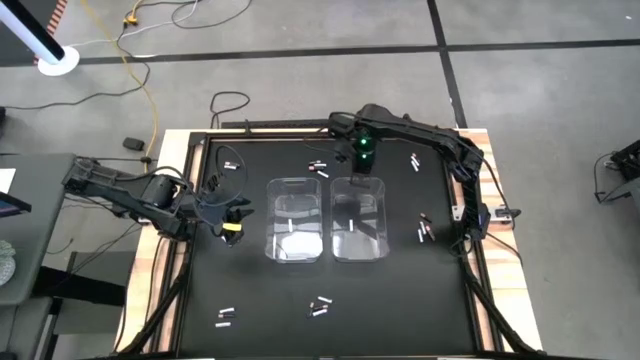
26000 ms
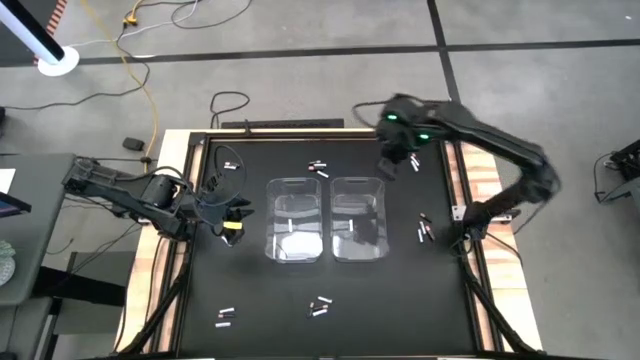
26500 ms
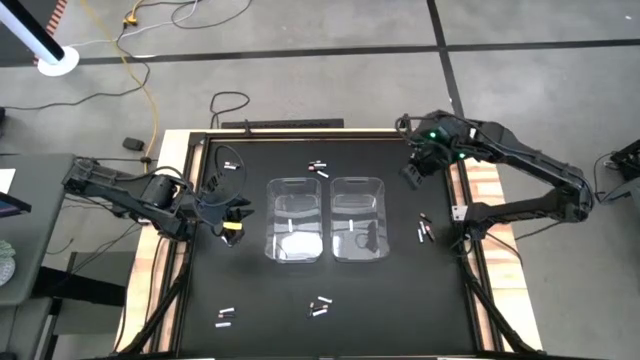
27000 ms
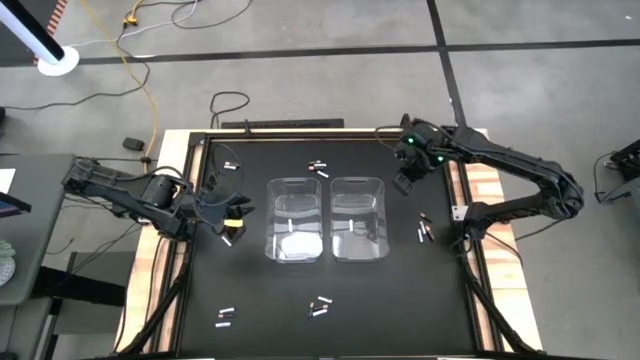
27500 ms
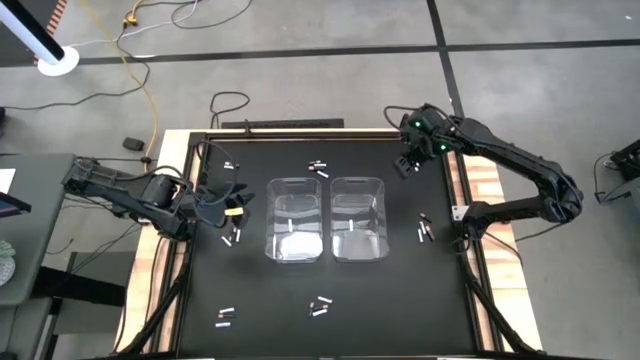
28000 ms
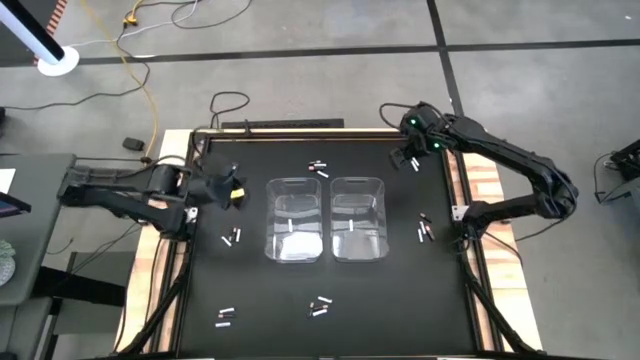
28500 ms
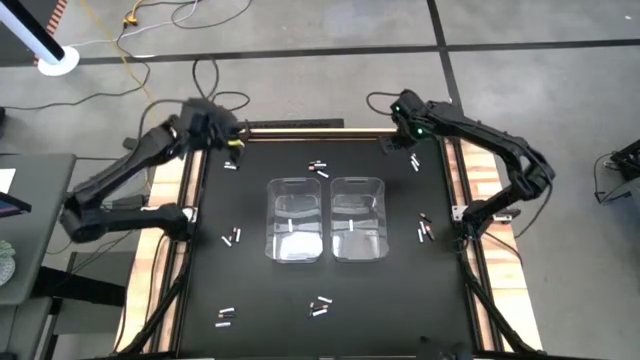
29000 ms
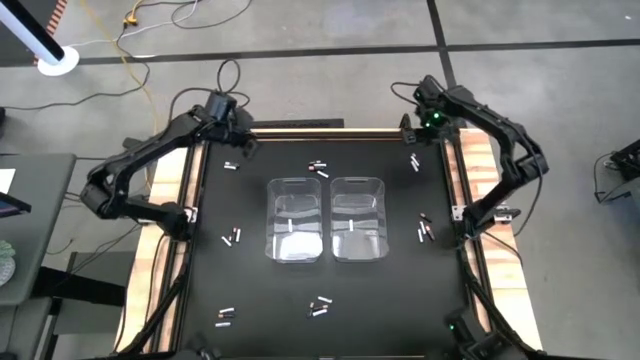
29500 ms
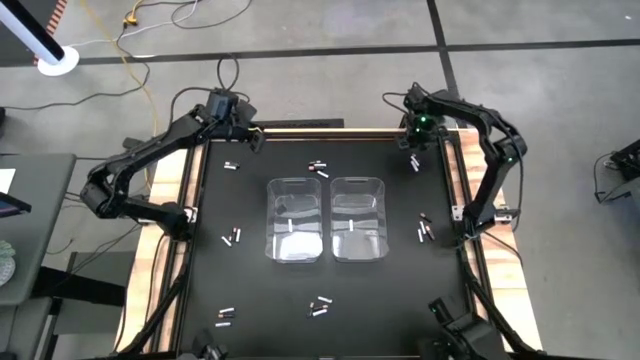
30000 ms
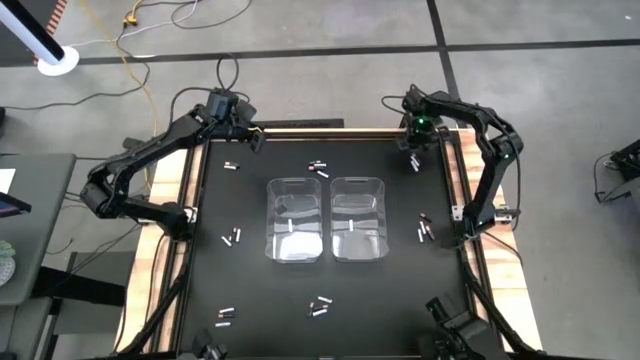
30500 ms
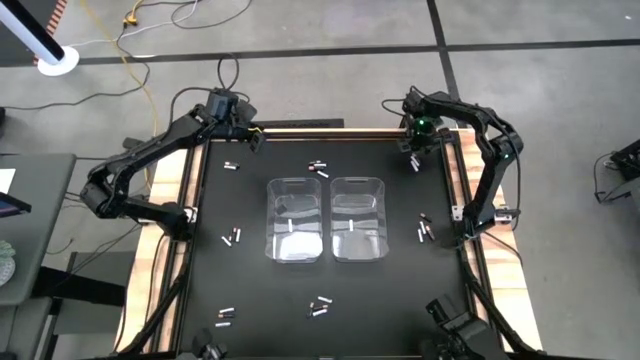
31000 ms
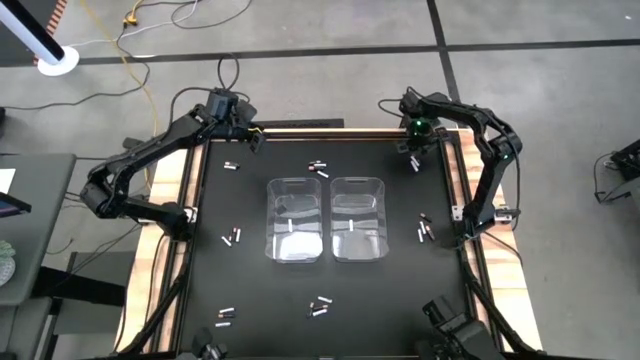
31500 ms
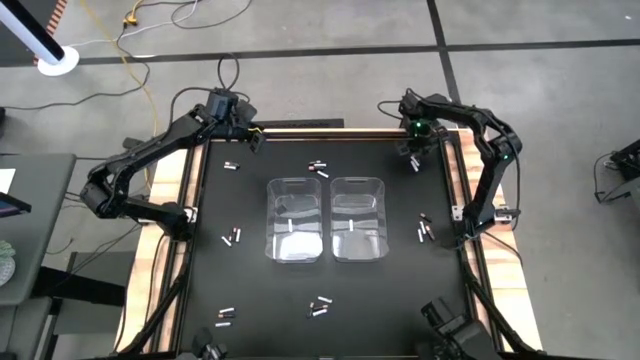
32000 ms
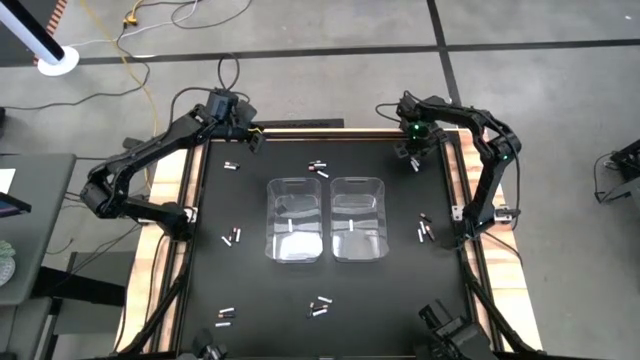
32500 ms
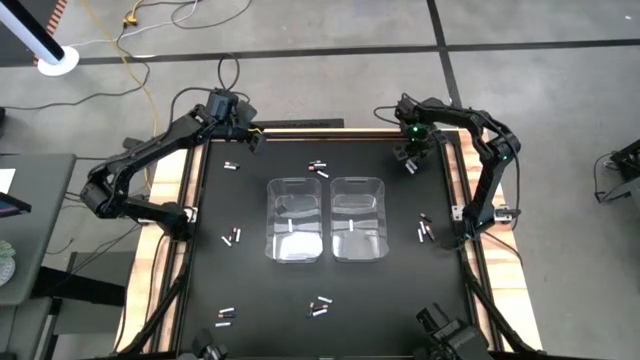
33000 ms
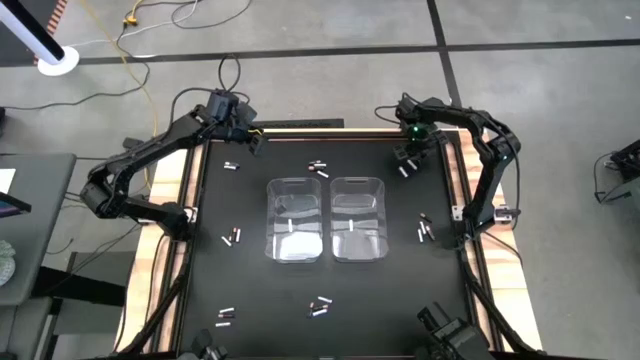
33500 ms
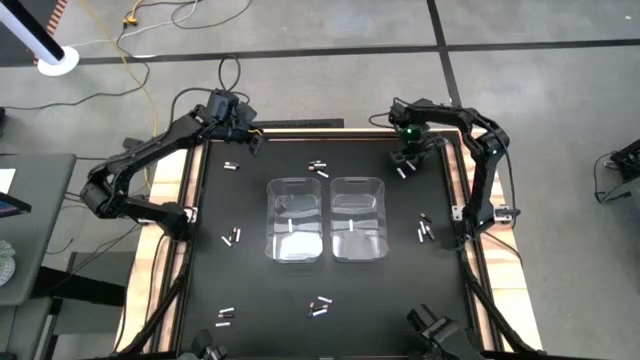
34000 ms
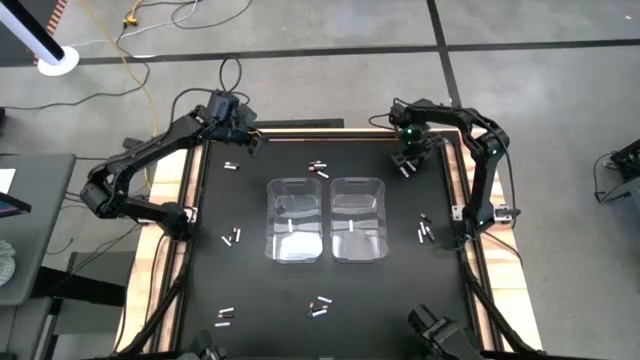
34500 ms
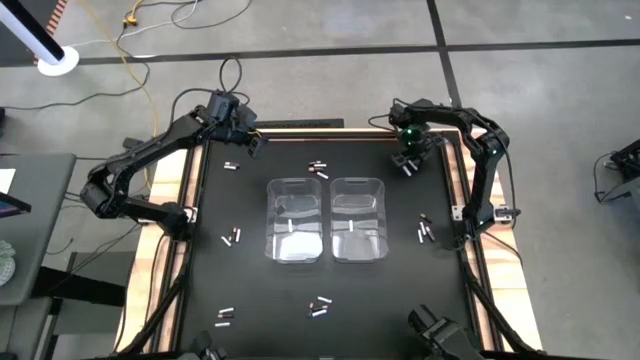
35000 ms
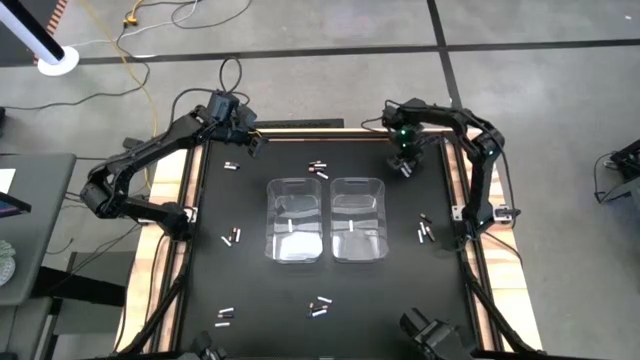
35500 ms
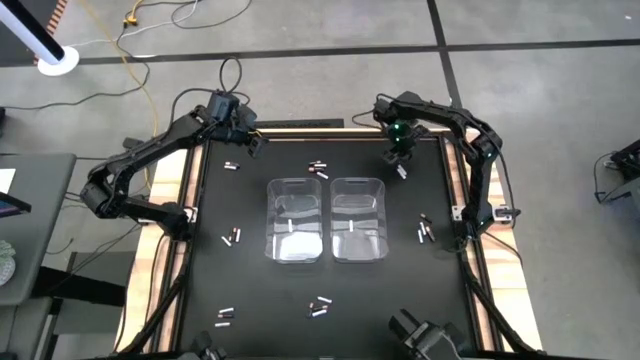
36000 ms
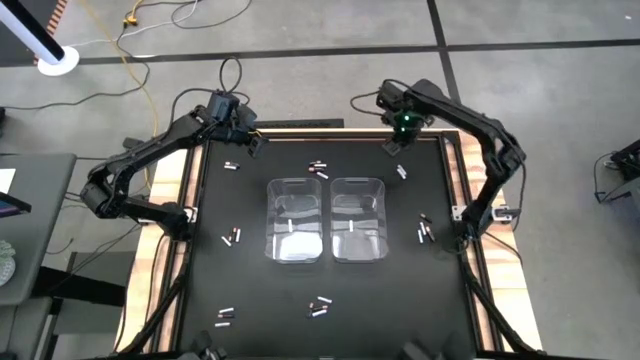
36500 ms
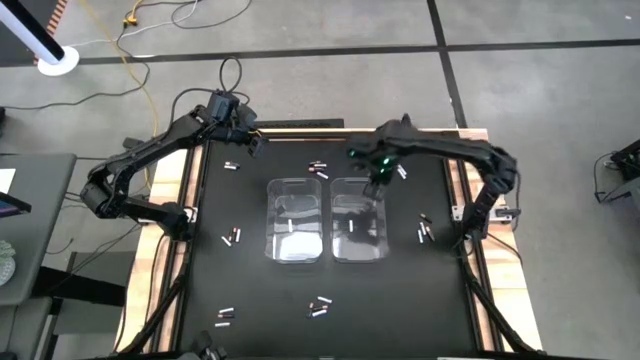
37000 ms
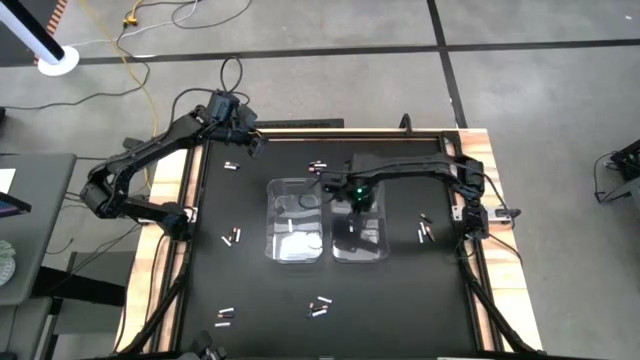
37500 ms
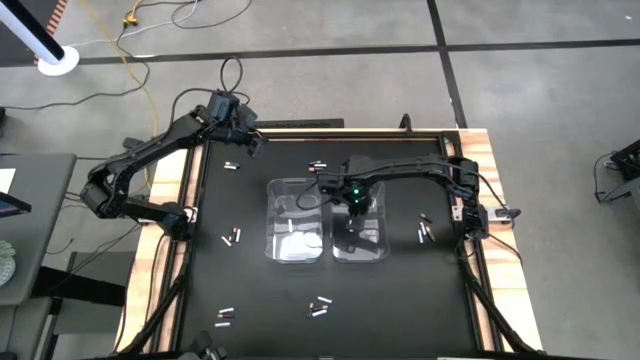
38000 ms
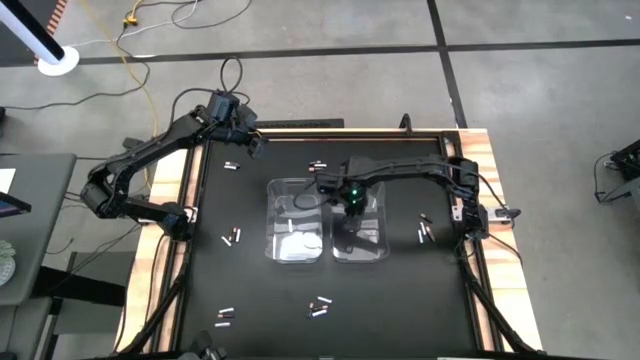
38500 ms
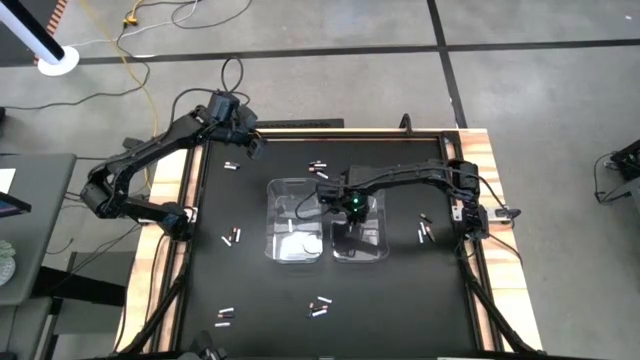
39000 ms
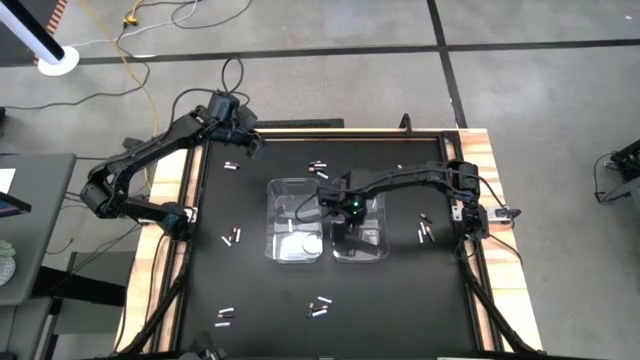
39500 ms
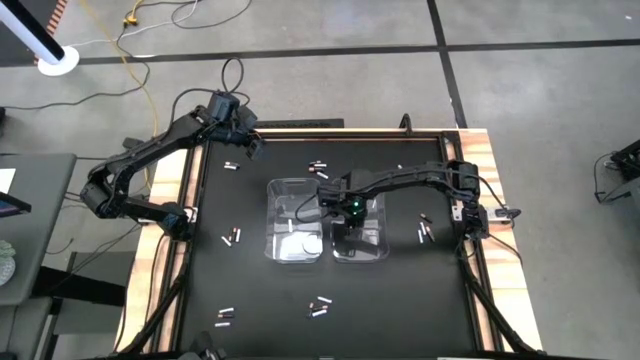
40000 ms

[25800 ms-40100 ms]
Task: Sort batteries
Put the black battery into the right transparent bin

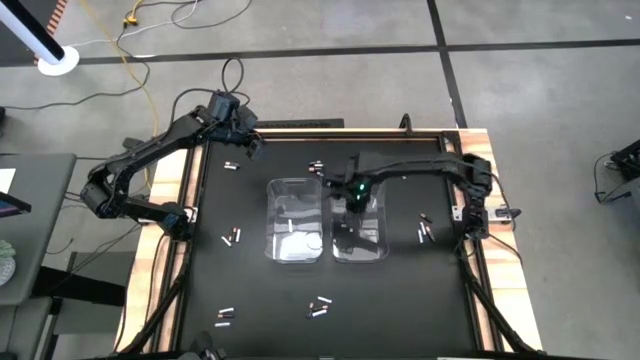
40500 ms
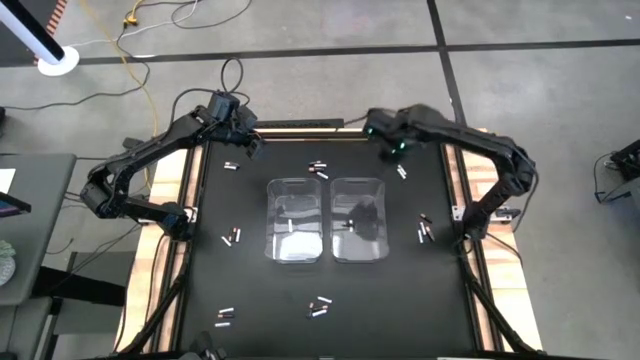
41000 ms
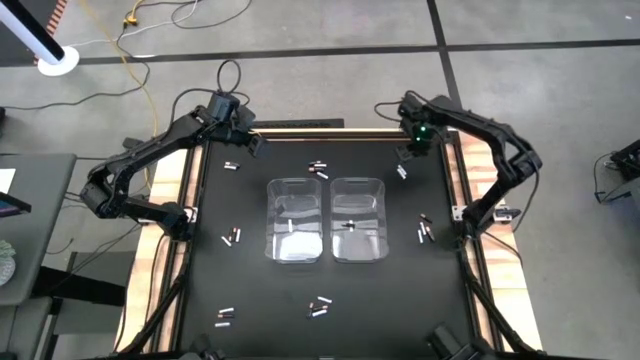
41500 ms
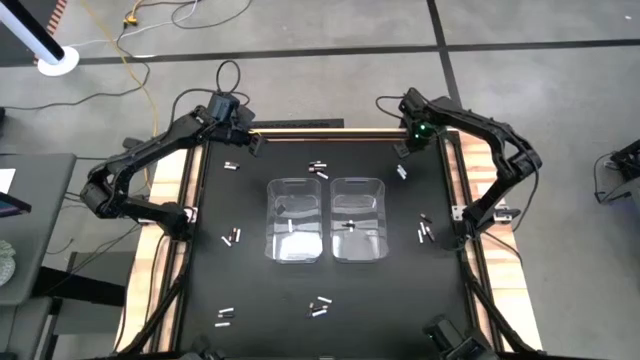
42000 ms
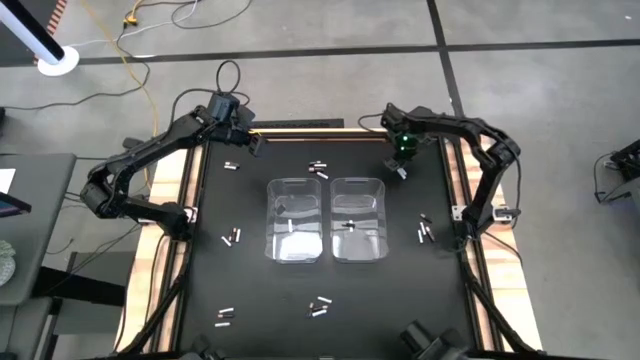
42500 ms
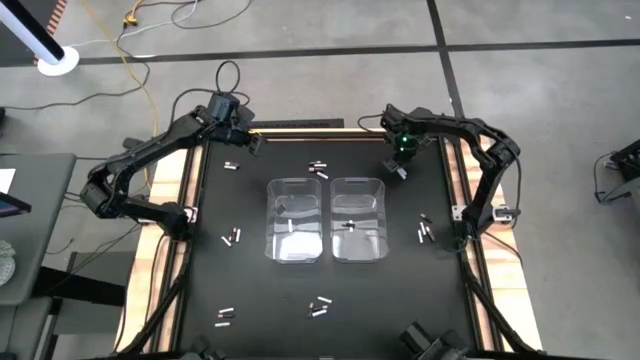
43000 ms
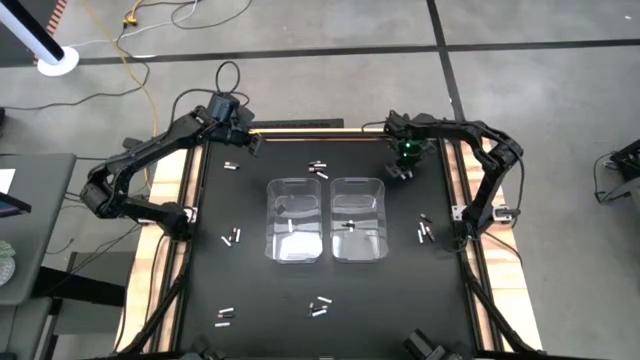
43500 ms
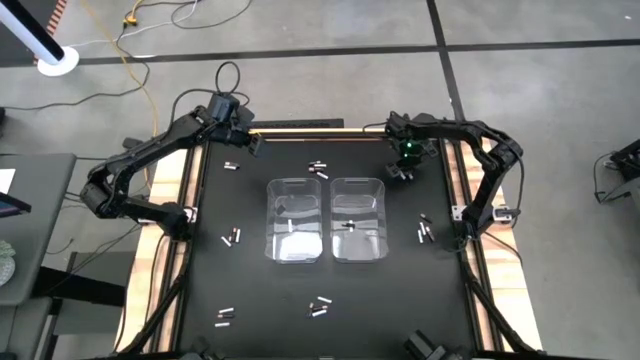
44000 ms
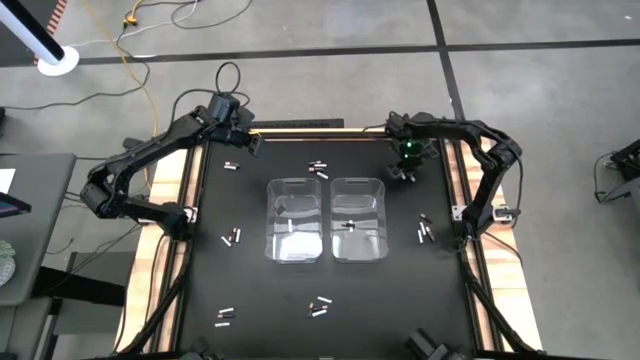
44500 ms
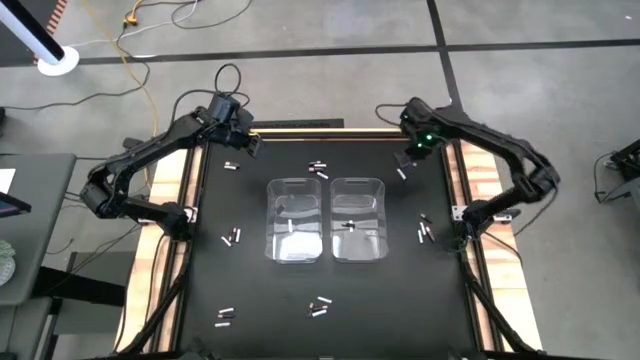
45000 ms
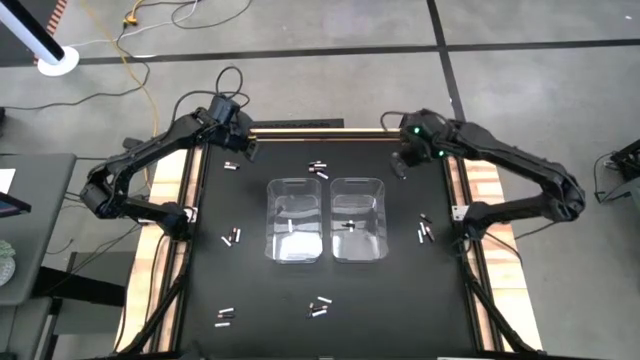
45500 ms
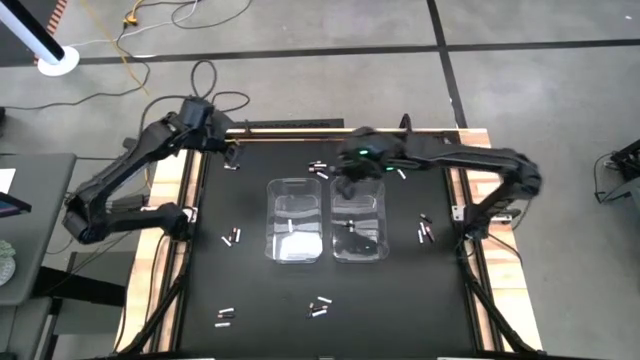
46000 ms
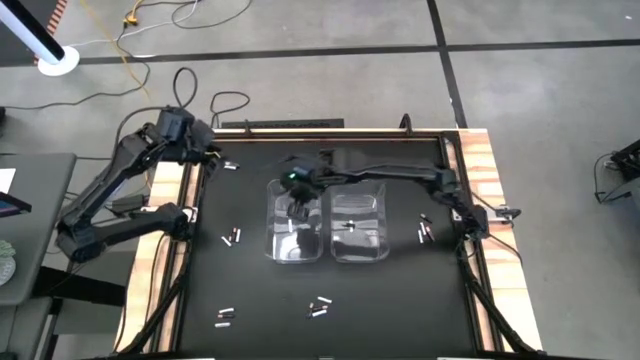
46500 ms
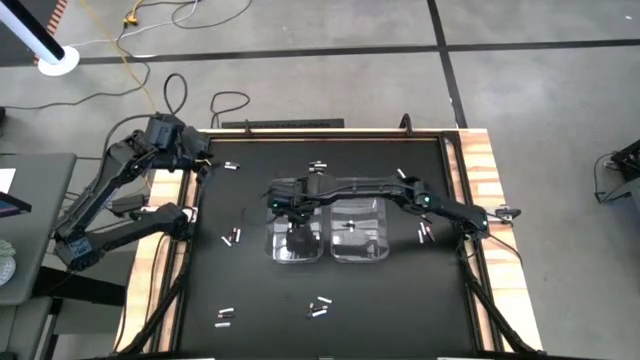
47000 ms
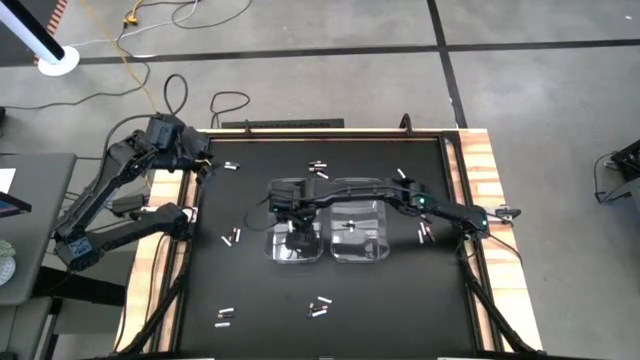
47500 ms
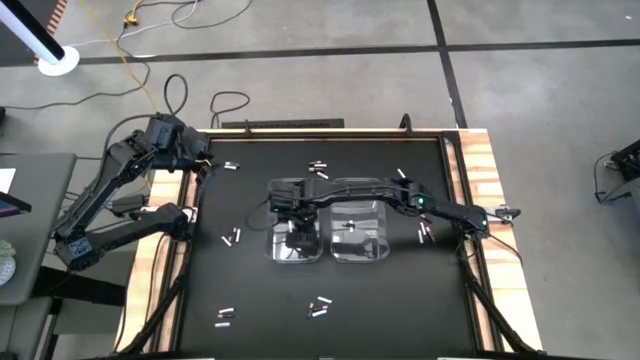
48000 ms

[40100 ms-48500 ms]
Put the white battery into the left transparent bin
